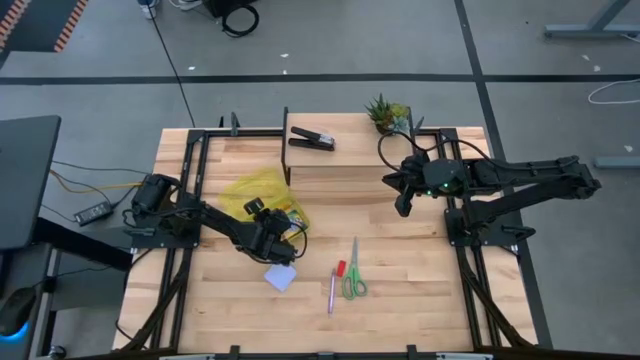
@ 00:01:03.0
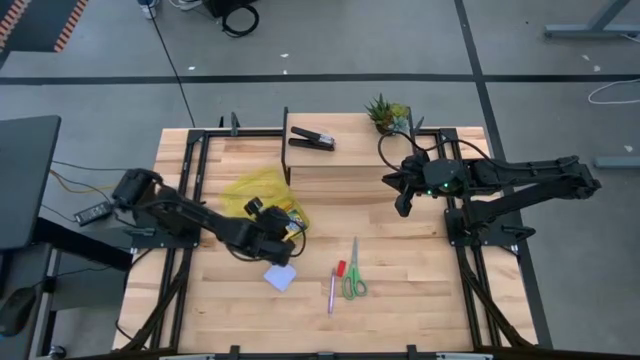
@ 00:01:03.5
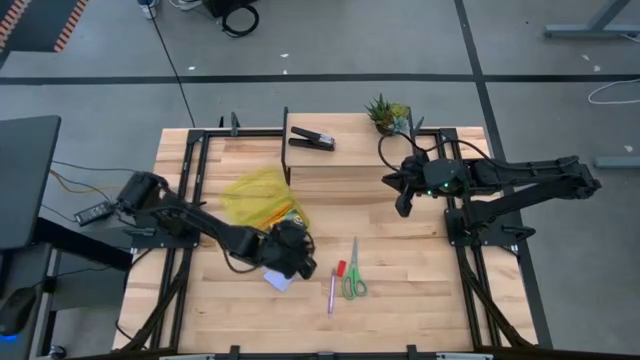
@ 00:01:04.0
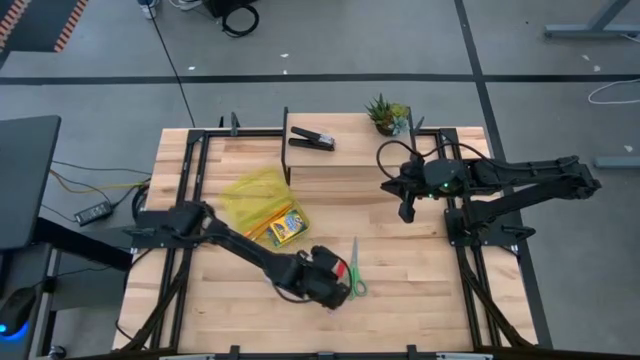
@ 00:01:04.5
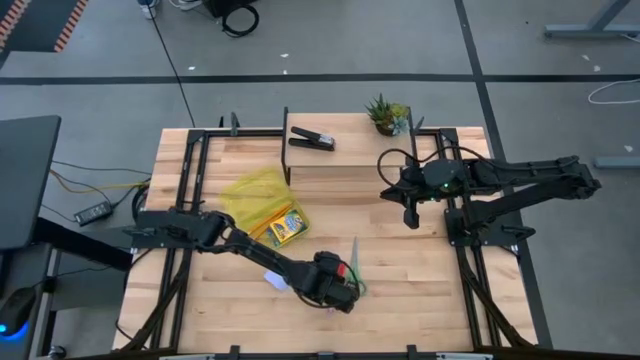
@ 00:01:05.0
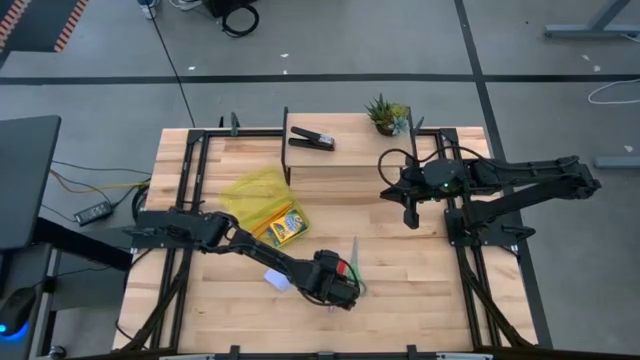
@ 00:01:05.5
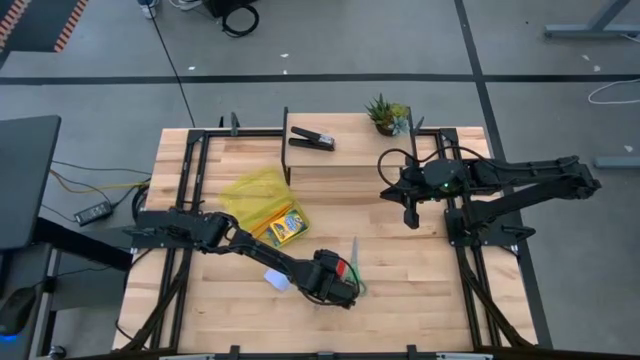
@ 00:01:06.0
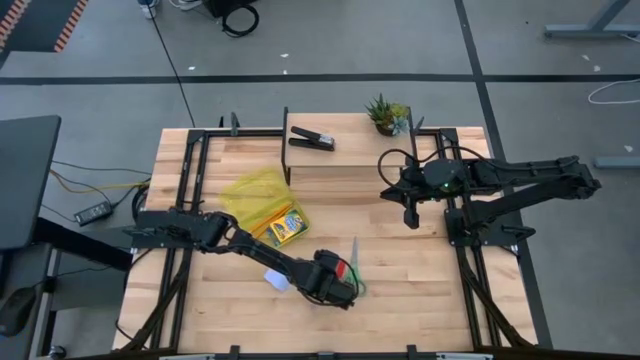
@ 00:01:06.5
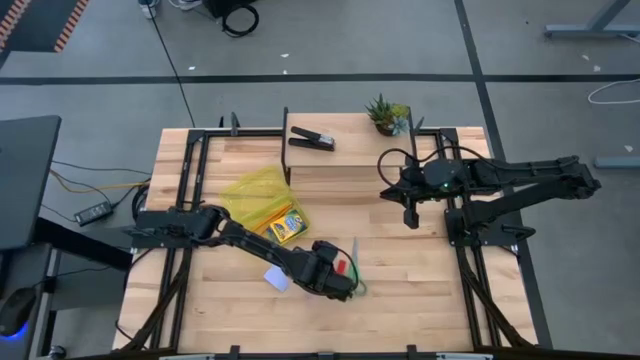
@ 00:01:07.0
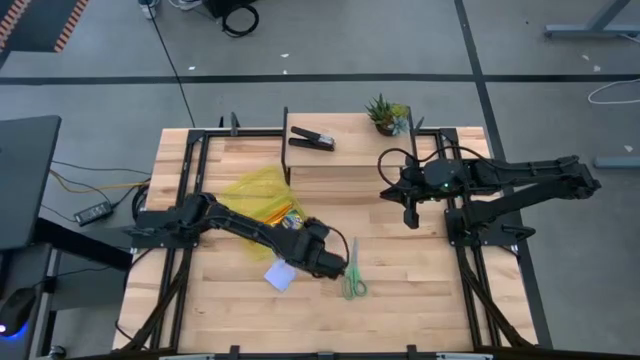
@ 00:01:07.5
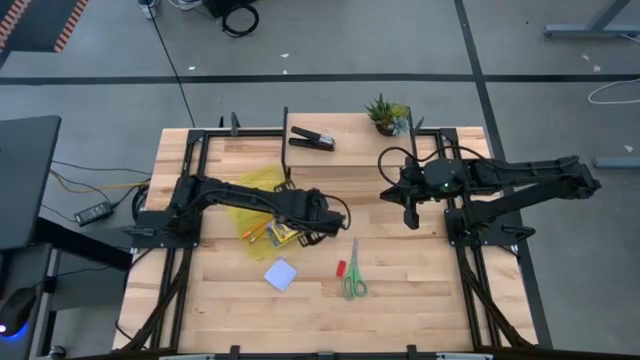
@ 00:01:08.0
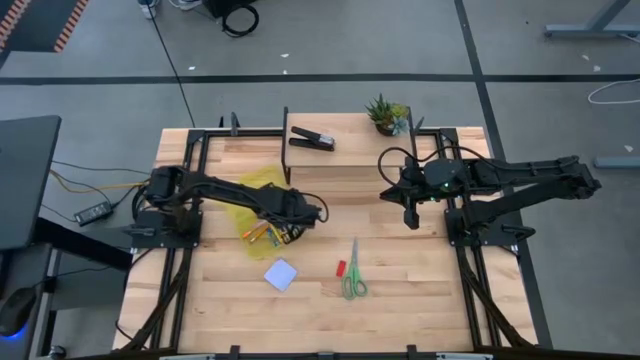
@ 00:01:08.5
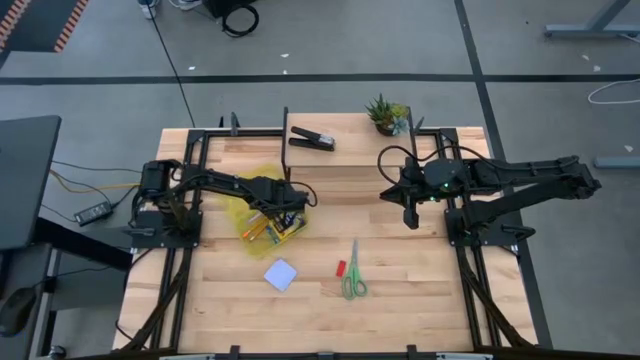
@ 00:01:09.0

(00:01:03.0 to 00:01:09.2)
Task: Pack school essentials
Put the violet pen into the yellow supply box

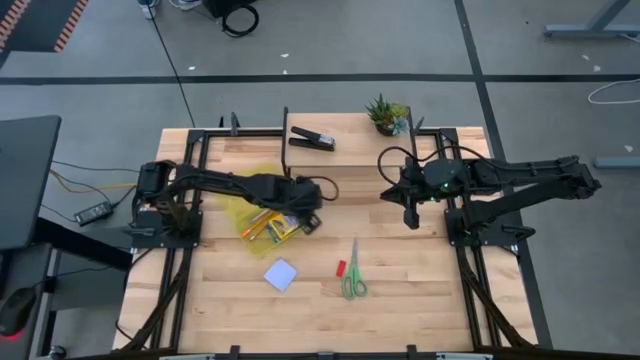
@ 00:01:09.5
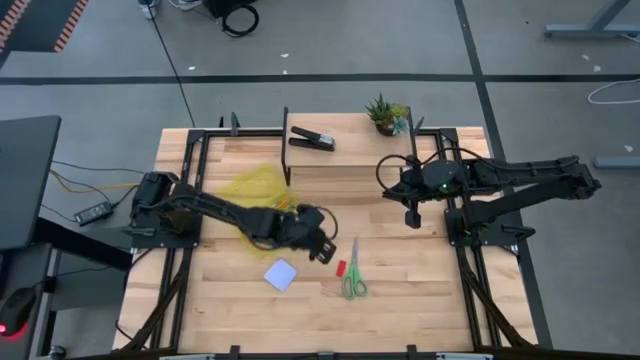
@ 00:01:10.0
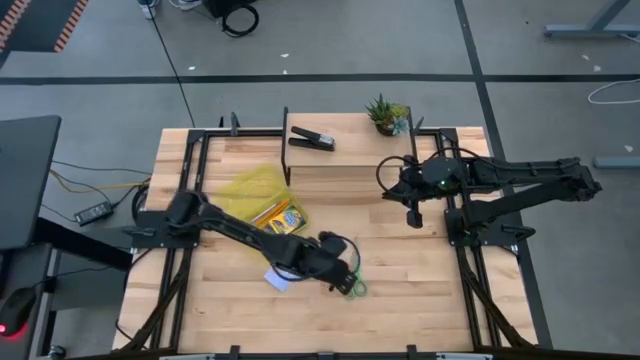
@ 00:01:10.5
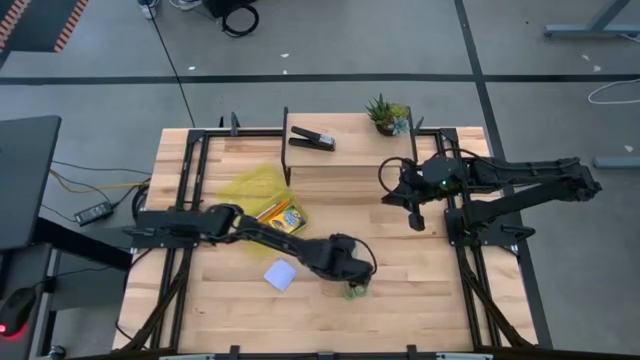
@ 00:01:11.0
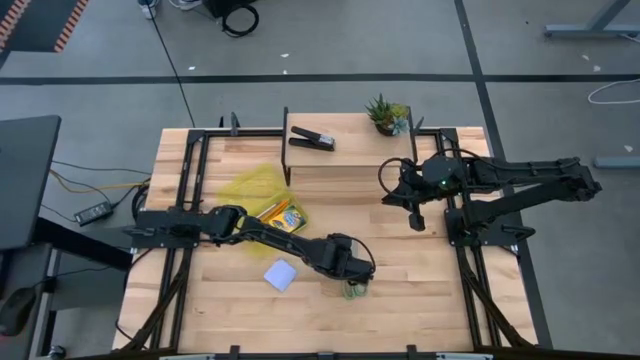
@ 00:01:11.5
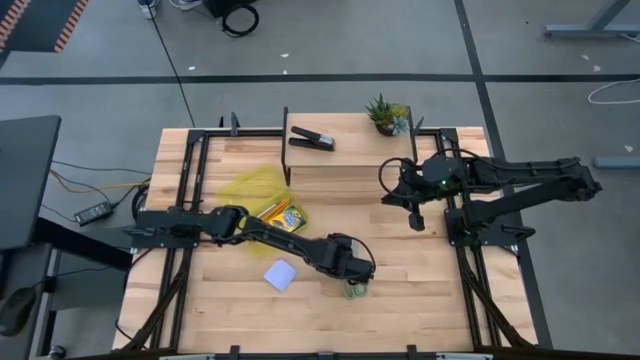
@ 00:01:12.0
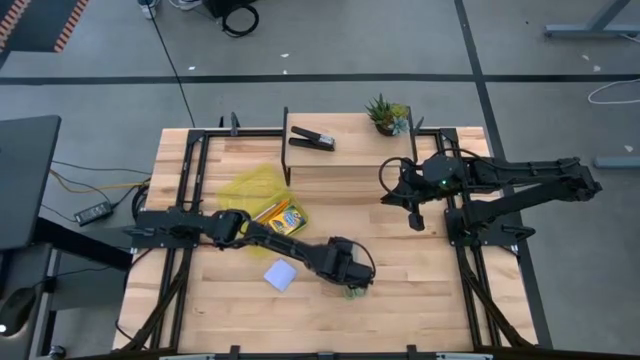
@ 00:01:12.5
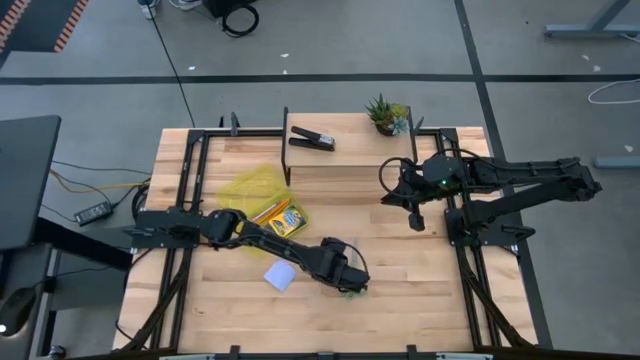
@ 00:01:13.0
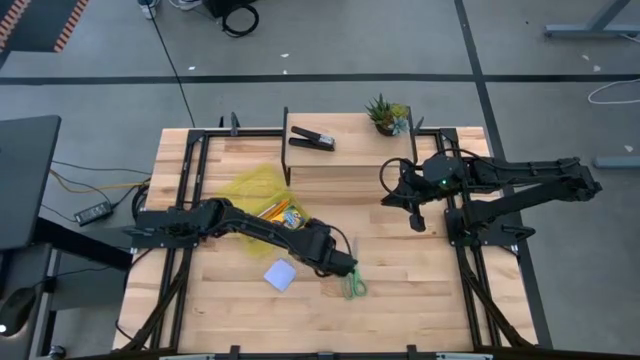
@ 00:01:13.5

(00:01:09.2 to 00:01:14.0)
Put the red eraser into the yellow supply box

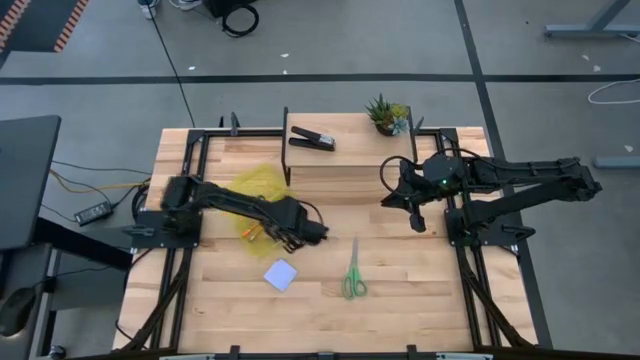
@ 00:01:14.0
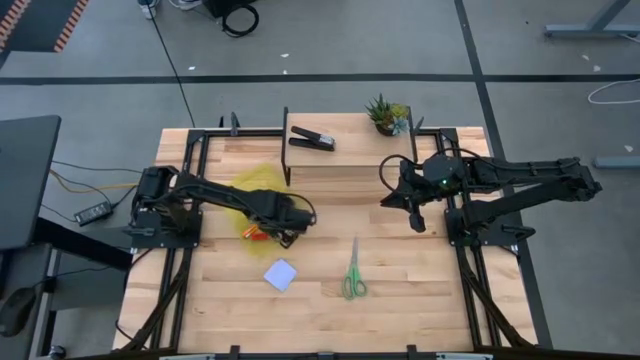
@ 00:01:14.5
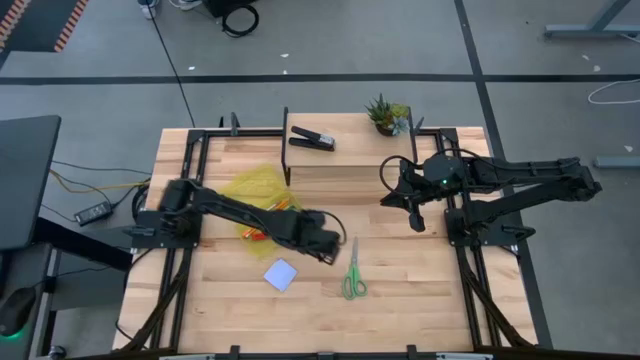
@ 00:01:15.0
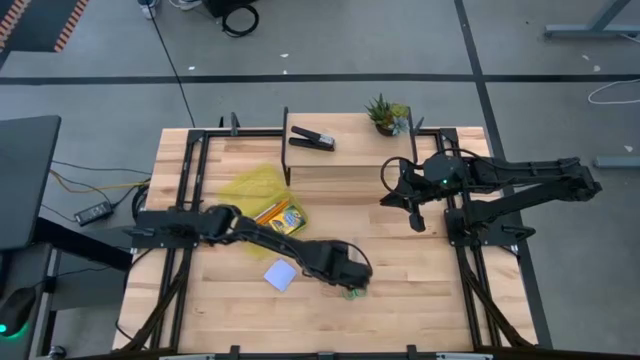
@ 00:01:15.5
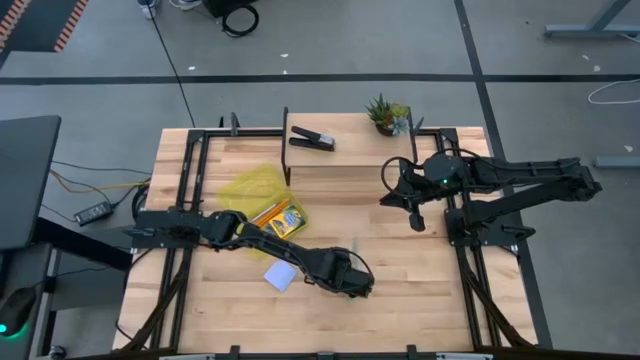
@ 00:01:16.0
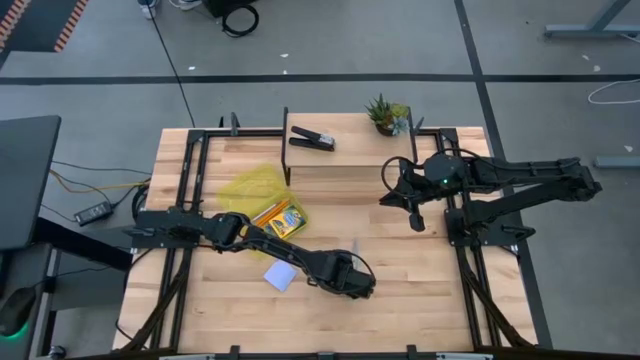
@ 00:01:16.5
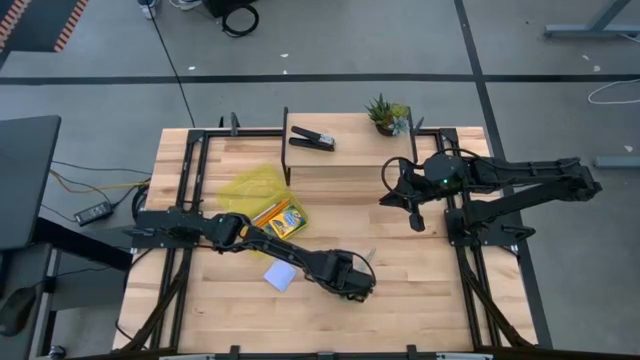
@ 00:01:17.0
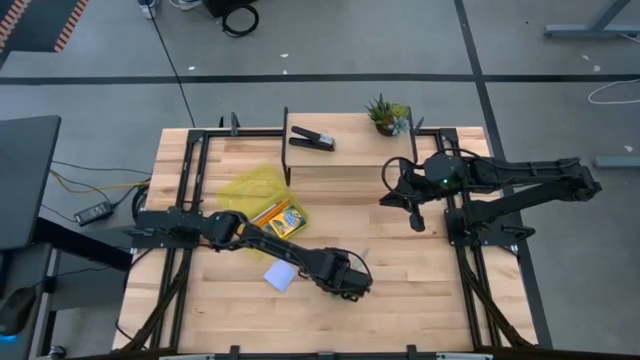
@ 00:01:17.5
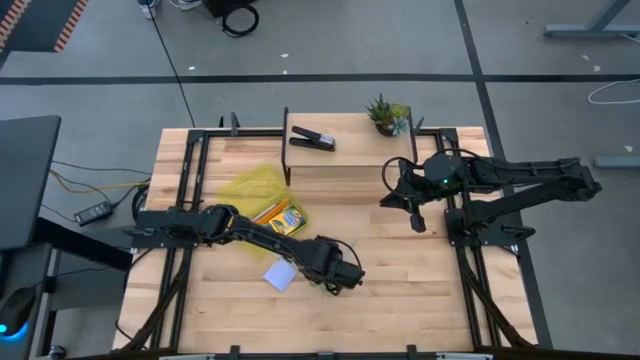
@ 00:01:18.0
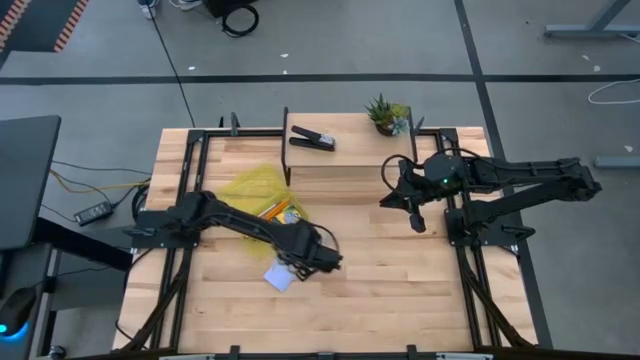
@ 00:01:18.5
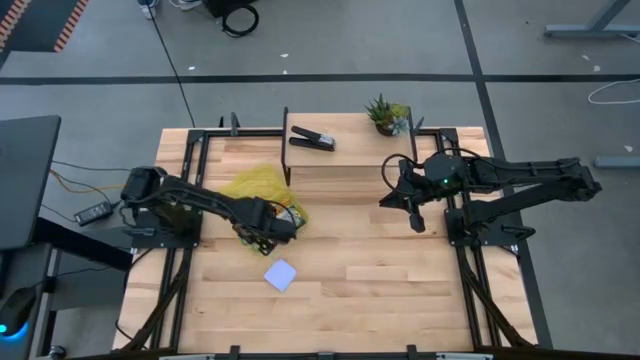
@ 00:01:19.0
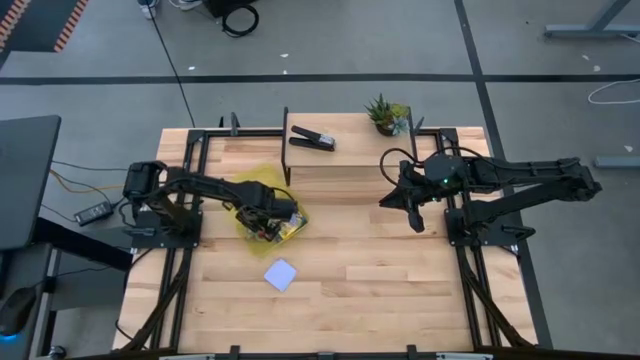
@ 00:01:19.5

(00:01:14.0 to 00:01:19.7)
Put the green scissor into the yellow supply box

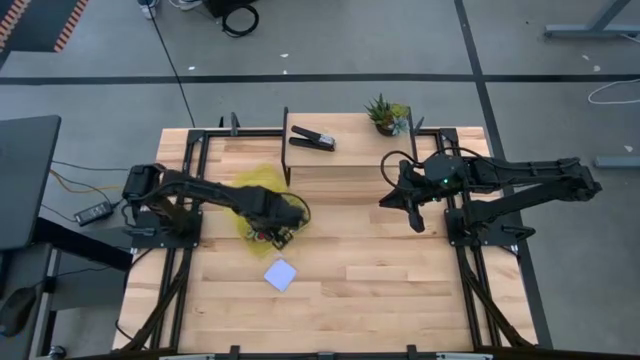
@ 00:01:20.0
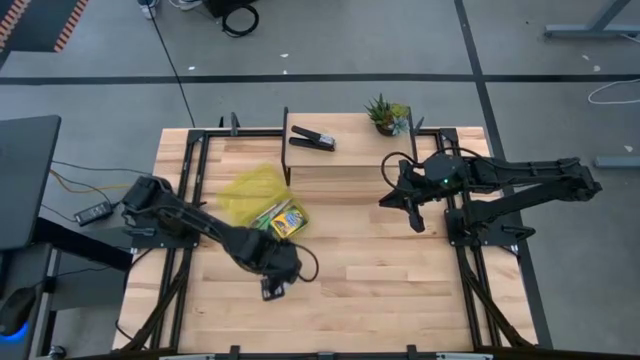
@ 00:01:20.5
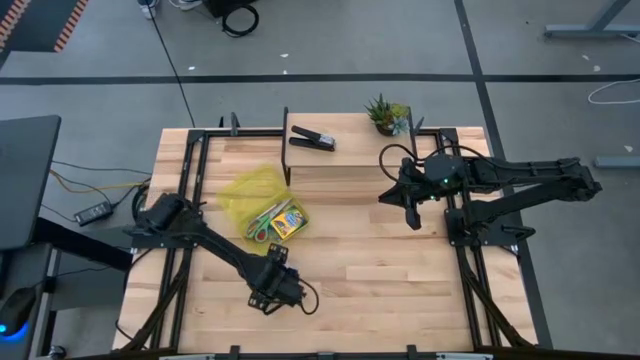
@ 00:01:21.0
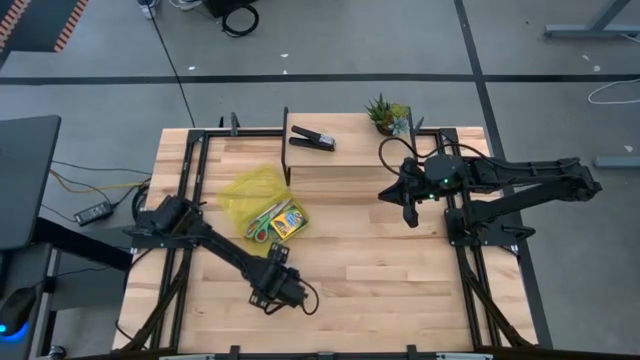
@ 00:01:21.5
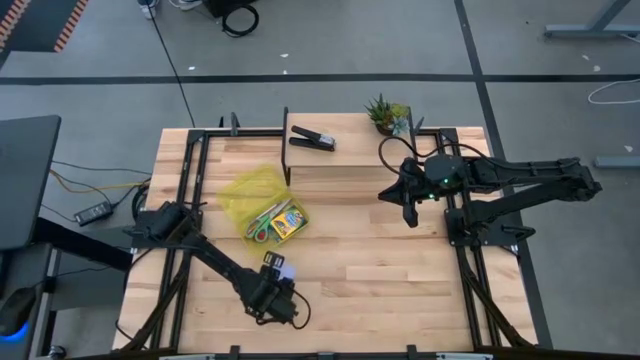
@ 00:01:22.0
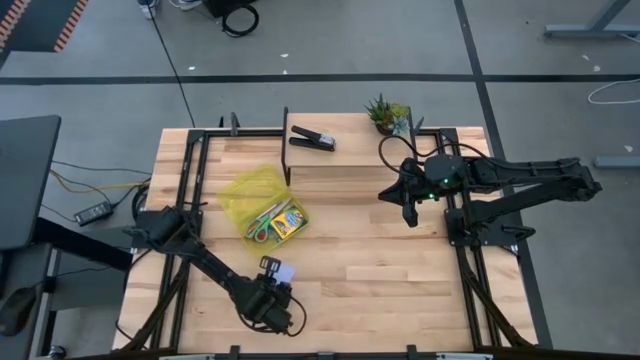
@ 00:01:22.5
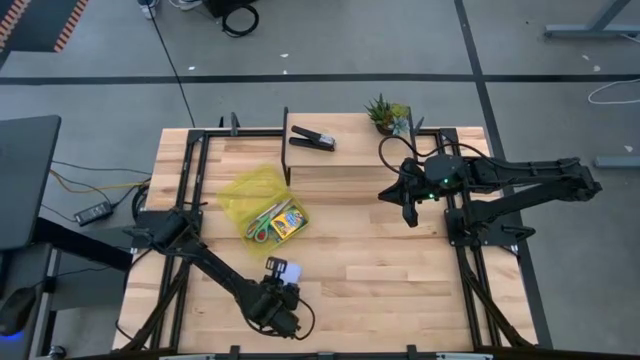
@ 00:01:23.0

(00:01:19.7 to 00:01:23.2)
Put the white sticky note into the yellow supply box
